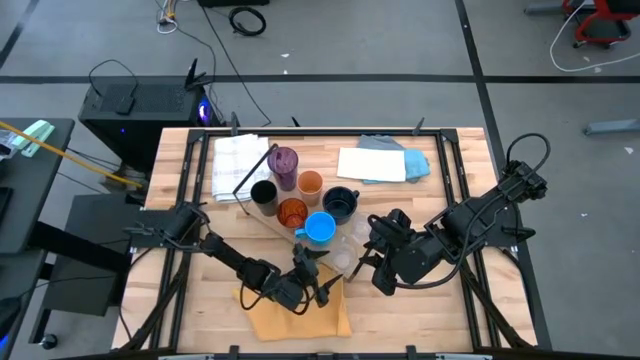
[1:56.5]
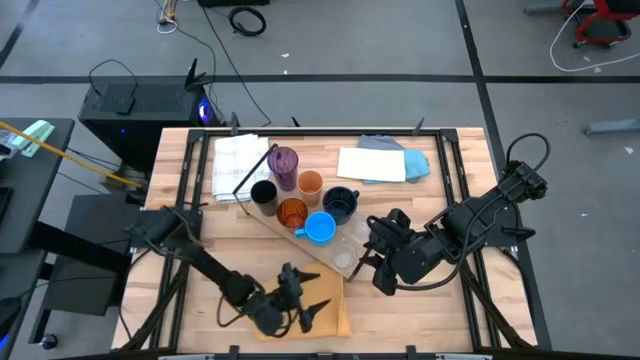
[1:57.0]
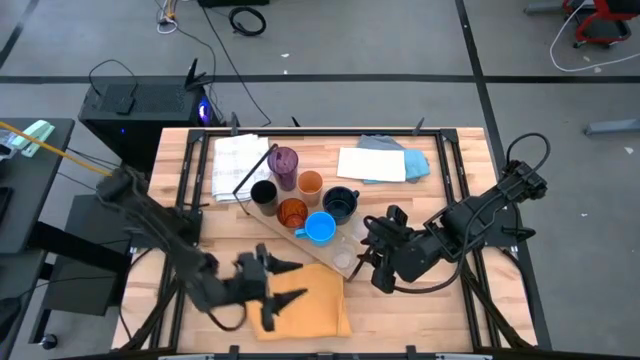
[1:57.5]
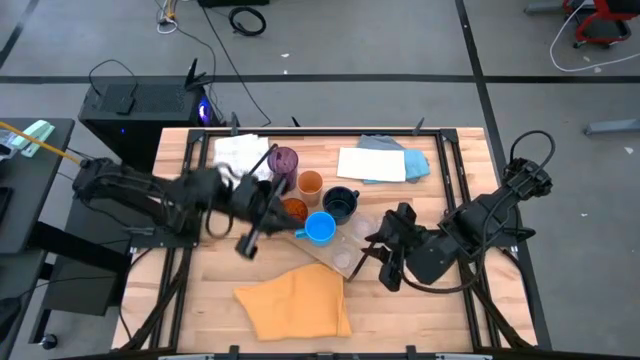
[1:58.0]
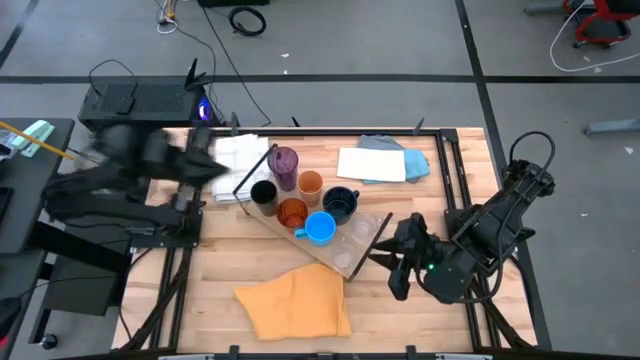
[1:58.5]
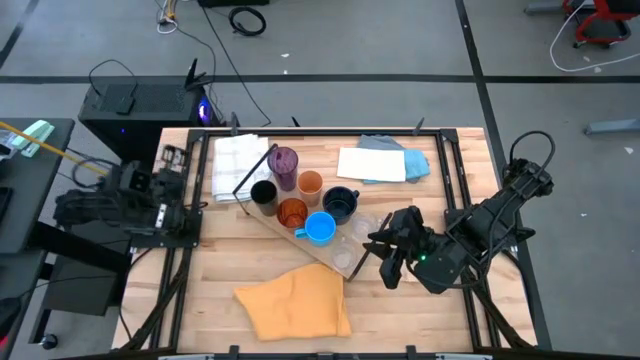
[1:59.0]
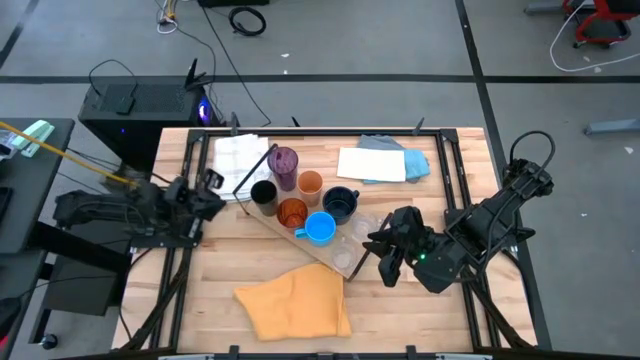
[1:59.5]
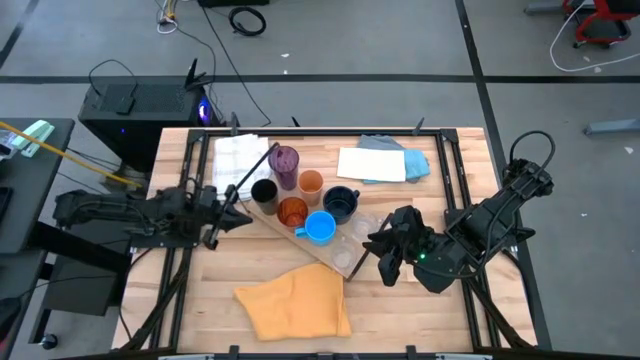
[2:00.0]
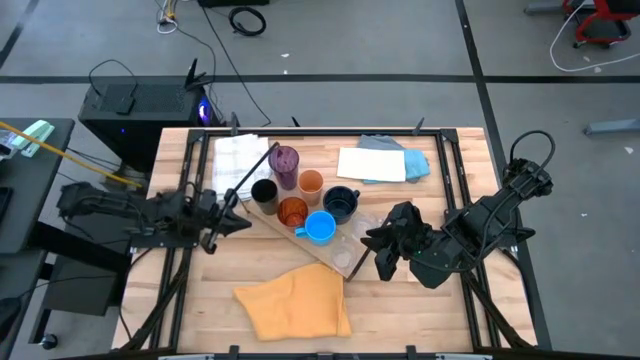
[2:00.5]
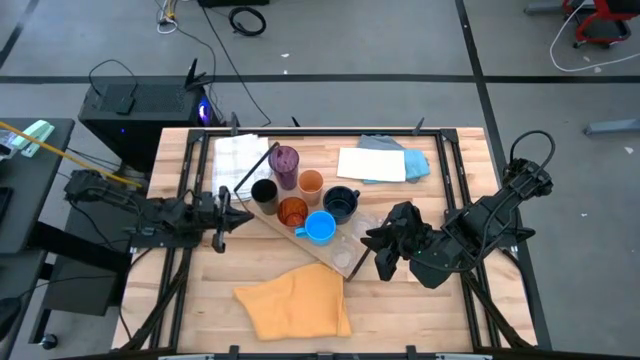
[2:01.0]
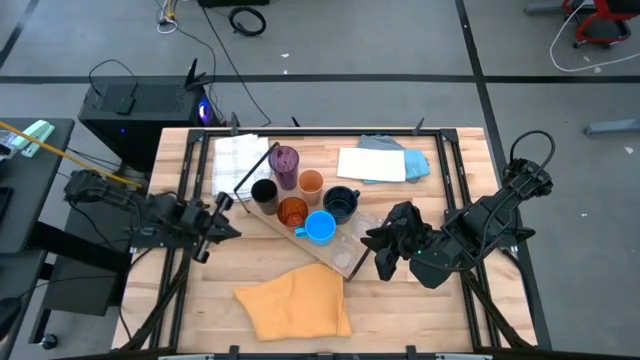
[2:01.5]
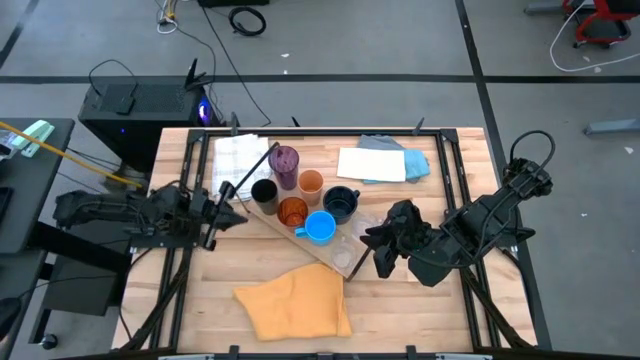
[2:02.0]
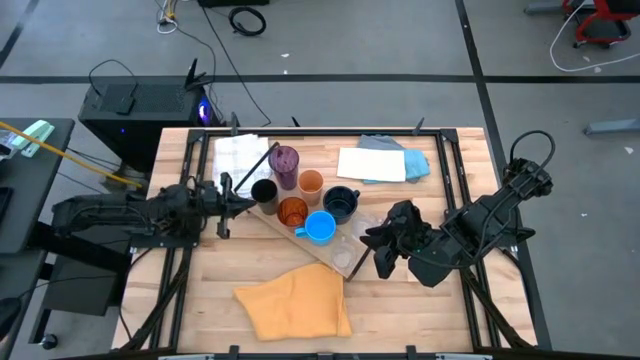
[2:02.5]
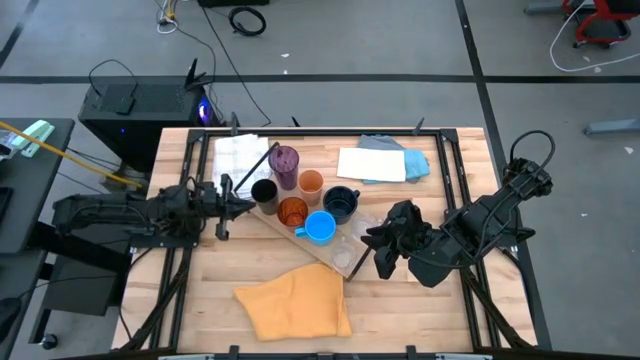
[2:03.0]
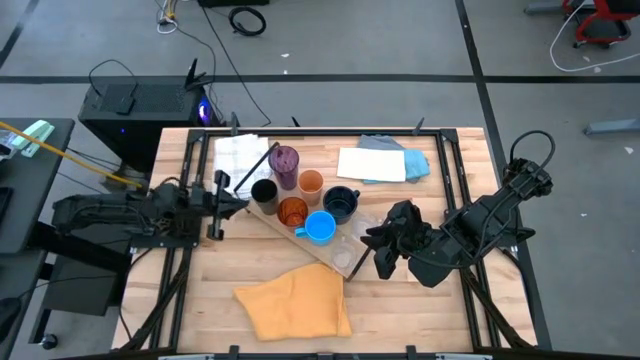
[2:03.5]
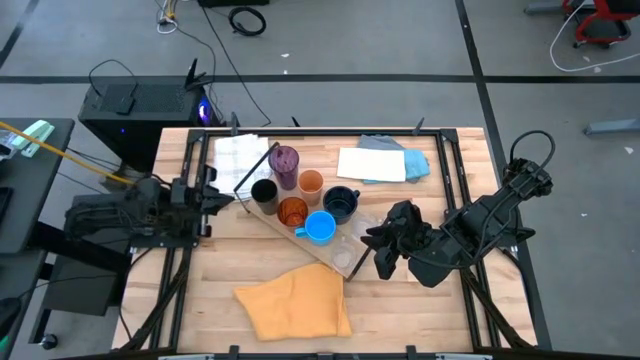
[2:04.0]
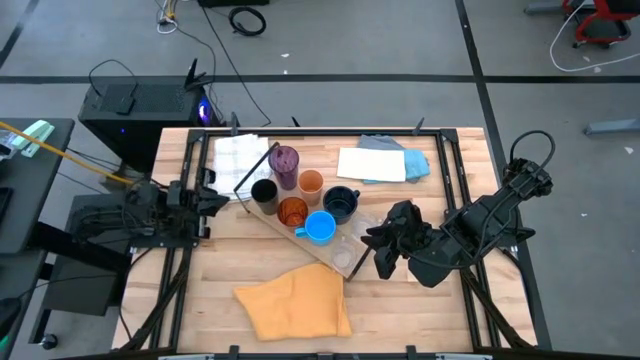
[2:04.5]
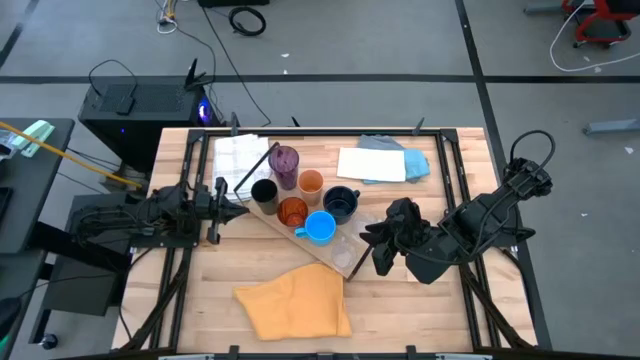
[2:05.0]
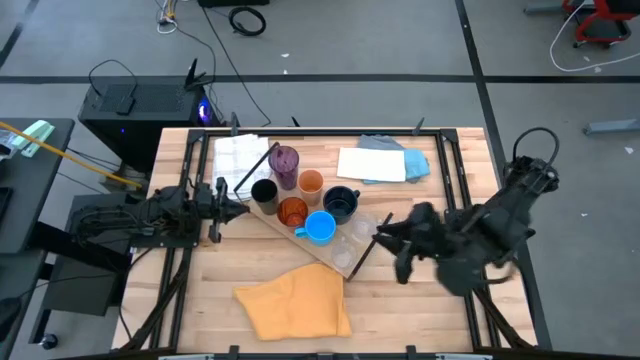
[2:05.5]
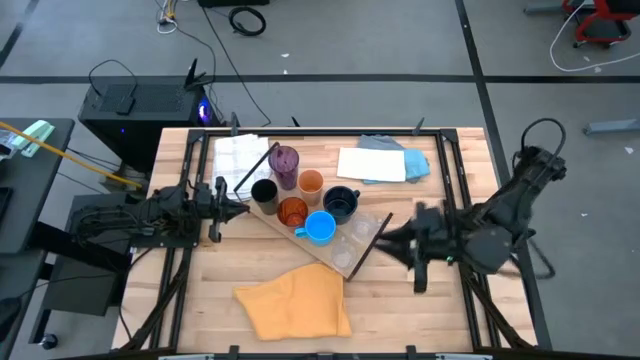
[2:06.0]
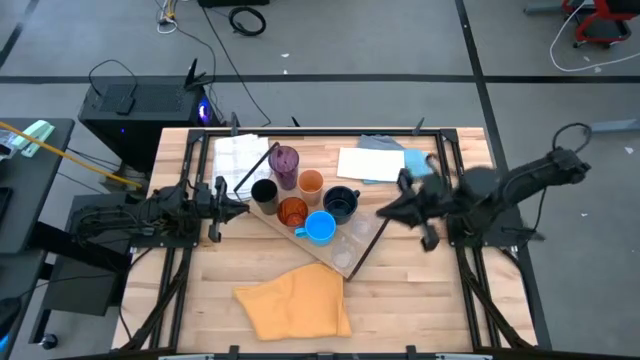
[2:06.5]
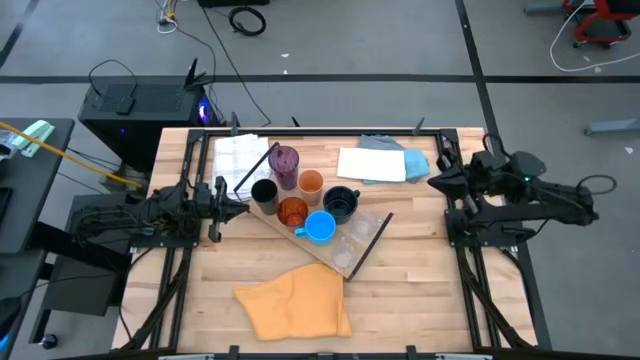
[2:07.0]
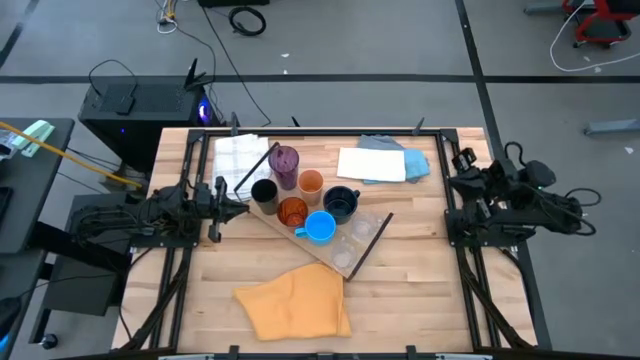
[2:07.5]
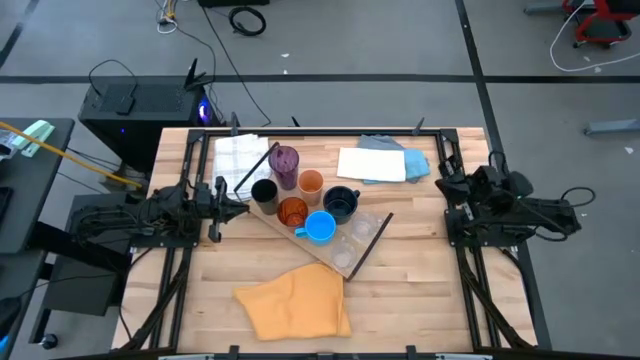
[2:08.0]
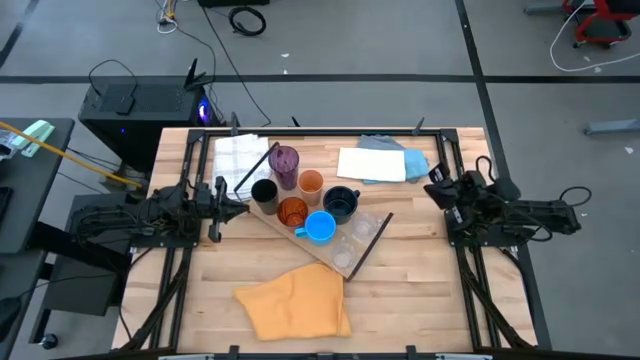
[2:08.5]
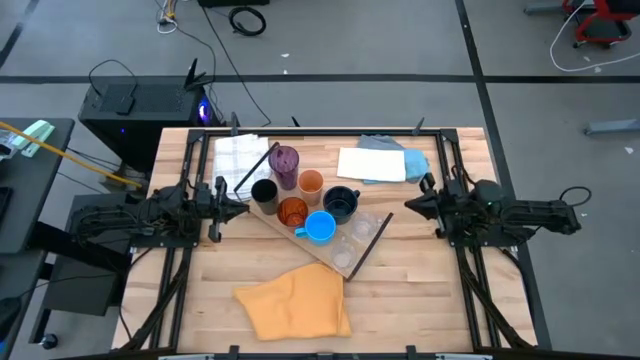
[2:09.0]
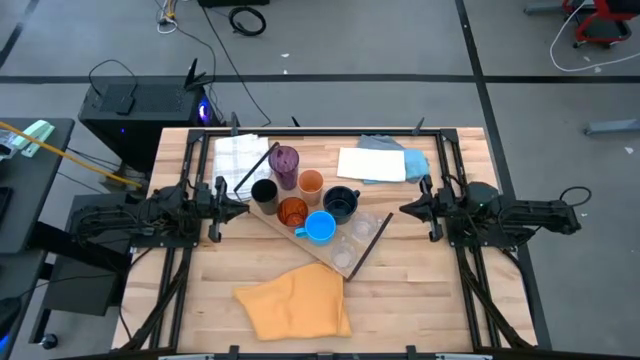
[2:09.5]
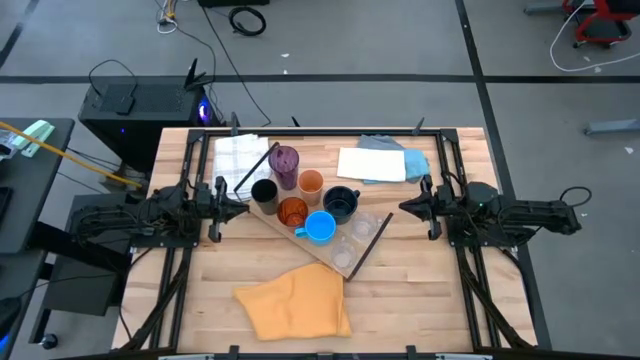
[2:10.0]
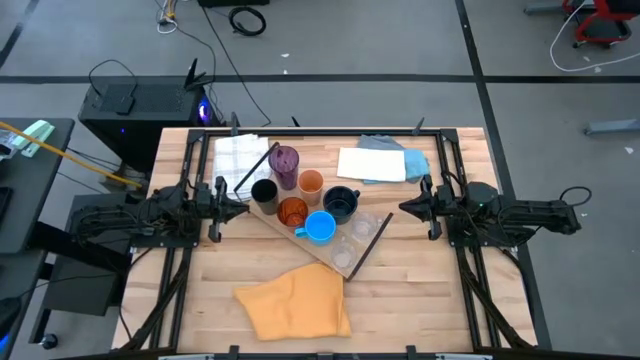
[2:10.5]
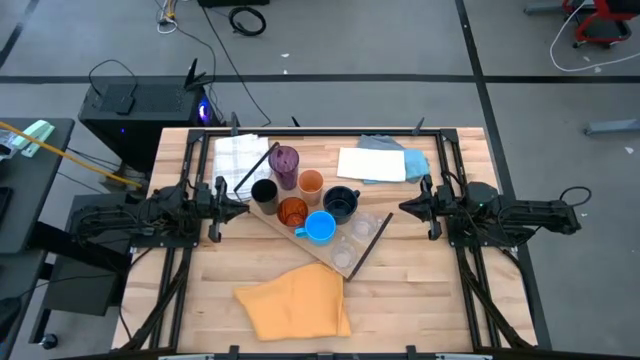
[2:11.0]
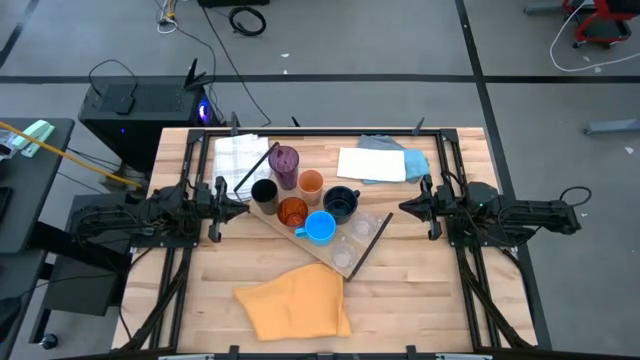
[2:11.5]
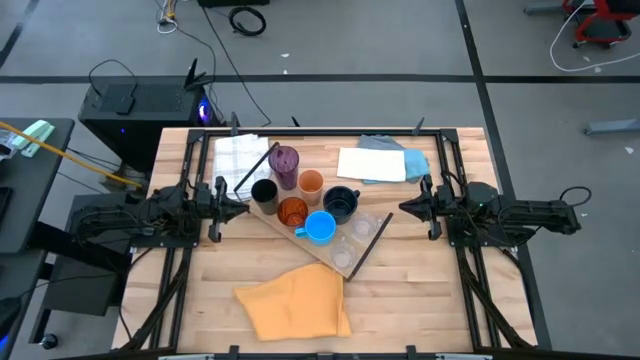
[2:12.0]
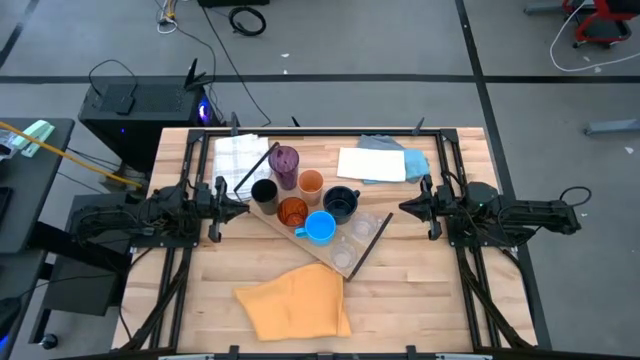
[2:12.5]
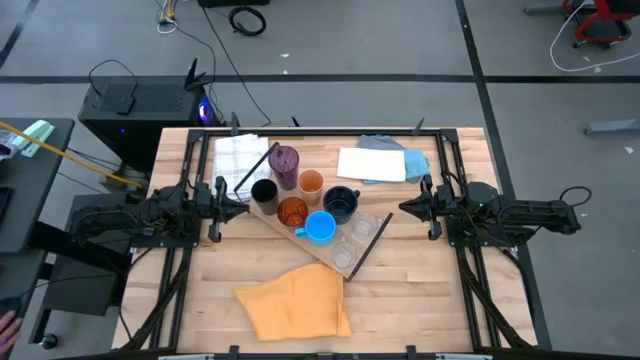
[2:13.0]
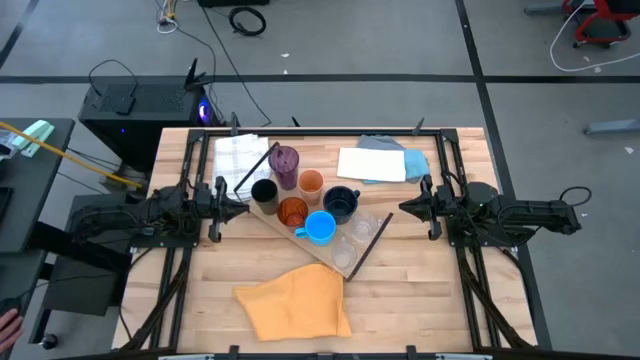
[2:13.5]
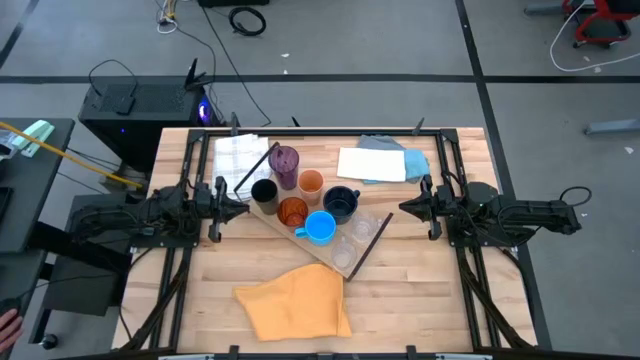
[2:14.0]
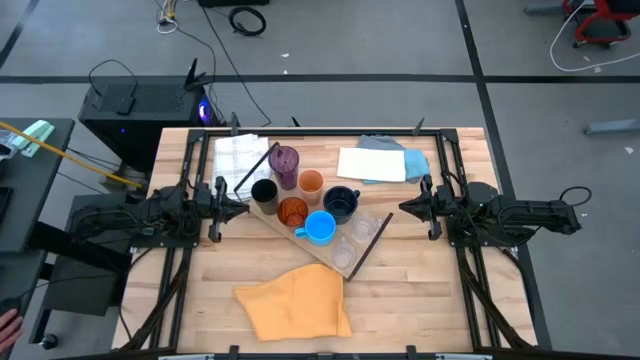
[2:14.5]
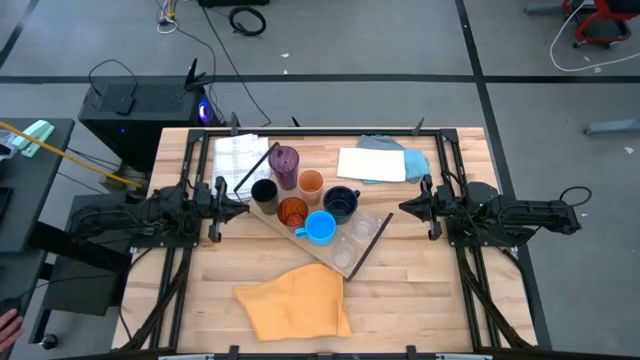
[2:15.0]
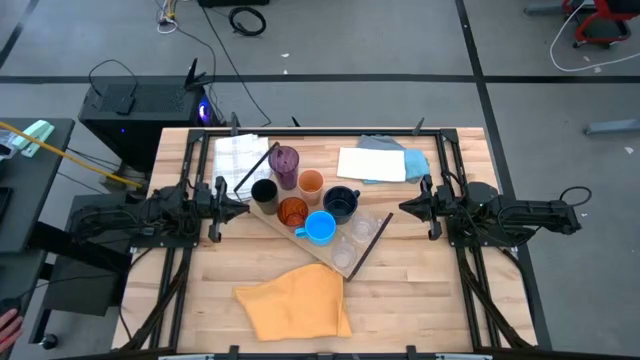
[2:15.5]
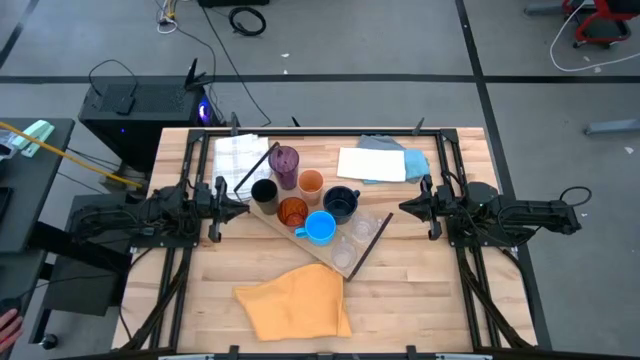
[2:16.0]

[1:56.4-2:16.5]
Task: Stack small to large cups/mugs on shelf
Return to Home Position

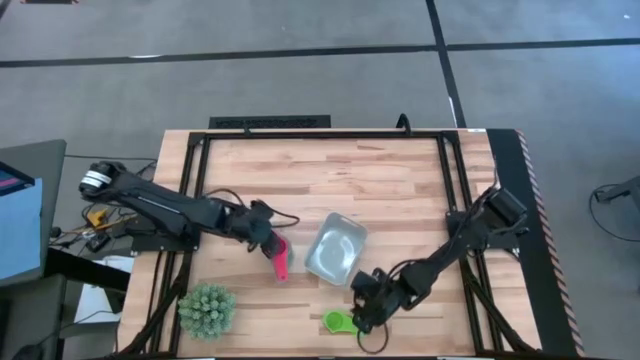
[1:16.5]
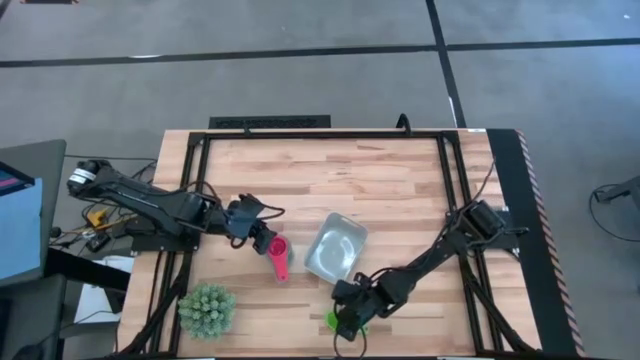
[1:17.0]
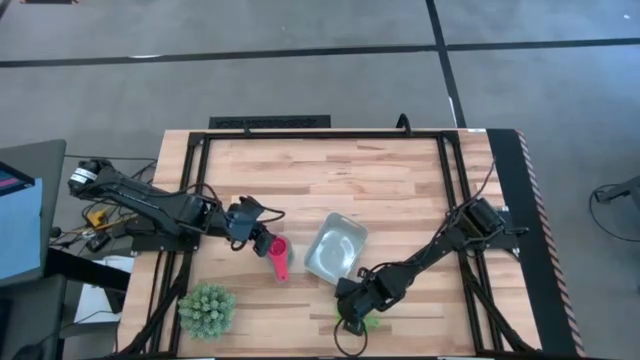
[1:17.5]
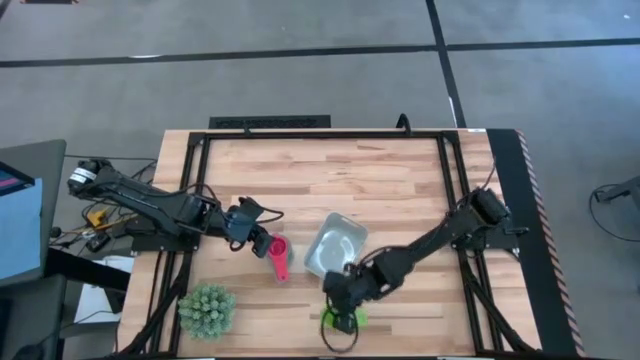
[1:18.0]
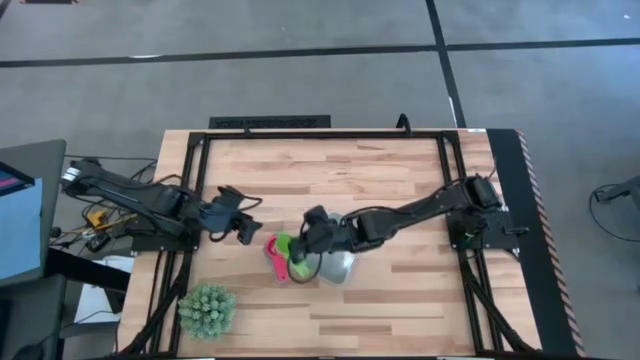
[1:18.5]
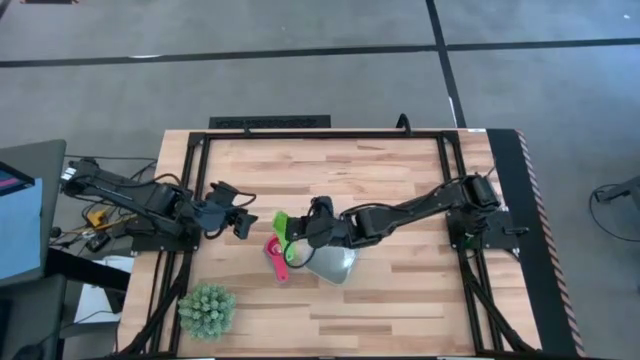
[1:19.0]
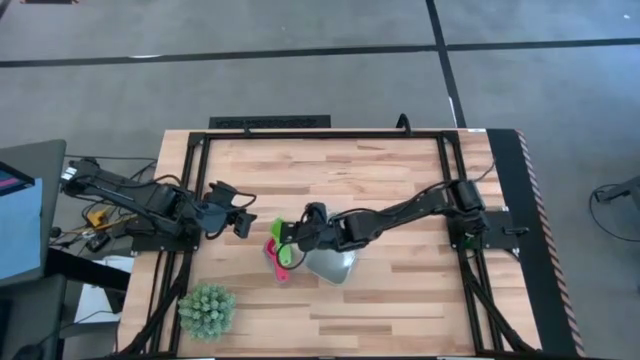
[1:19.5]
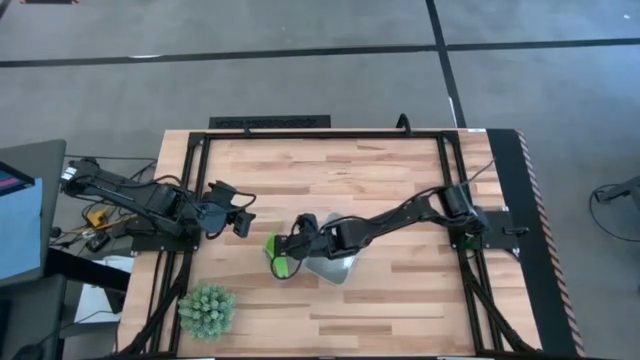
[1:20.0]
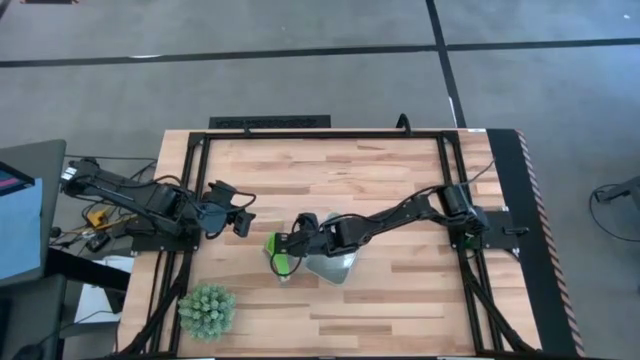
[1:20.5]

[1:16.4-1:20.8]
Task: Nest measuring cups in basket
Stack the green measuring cup on top of the red measuring cup
